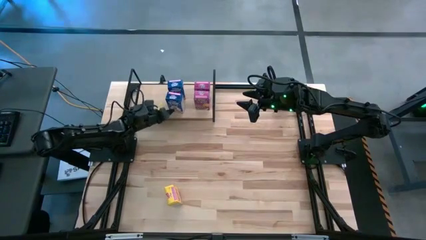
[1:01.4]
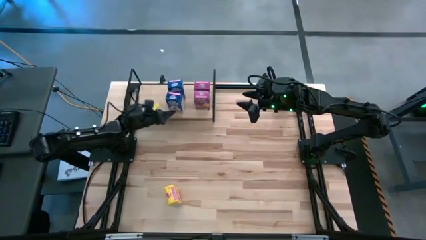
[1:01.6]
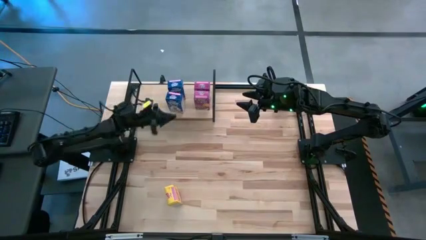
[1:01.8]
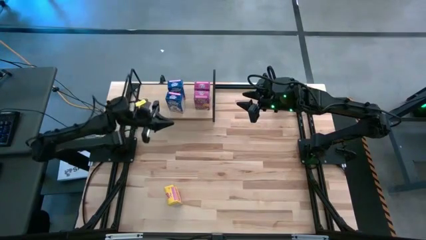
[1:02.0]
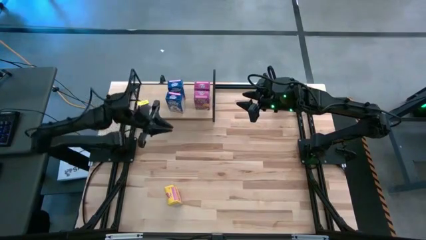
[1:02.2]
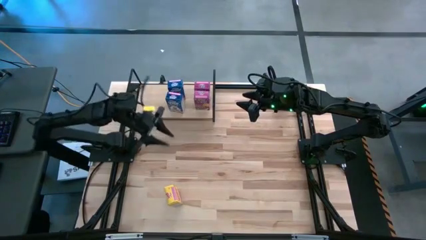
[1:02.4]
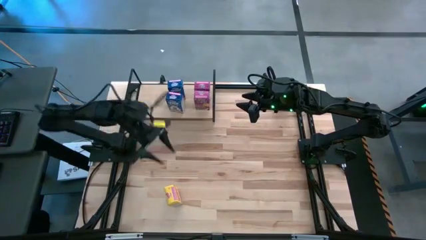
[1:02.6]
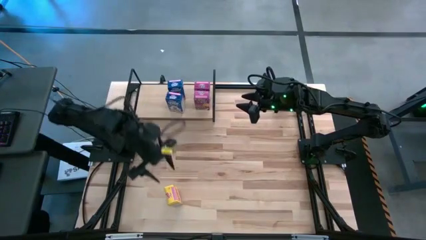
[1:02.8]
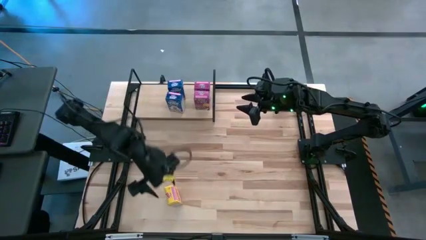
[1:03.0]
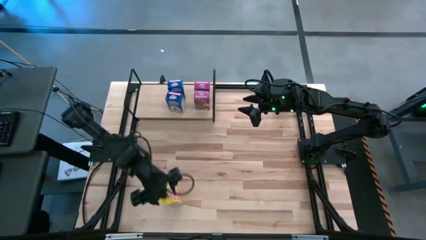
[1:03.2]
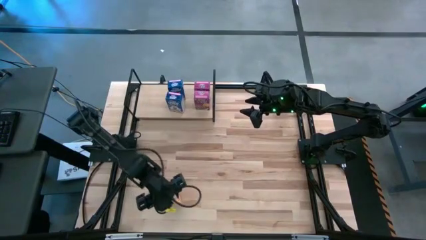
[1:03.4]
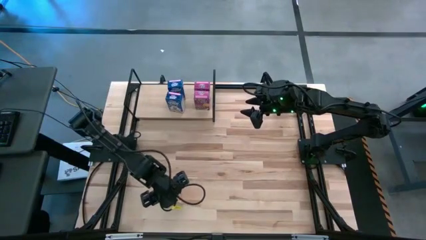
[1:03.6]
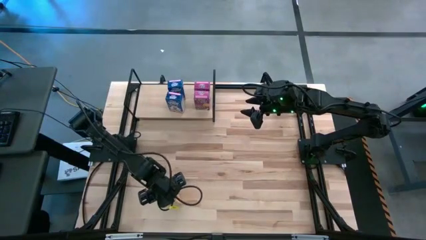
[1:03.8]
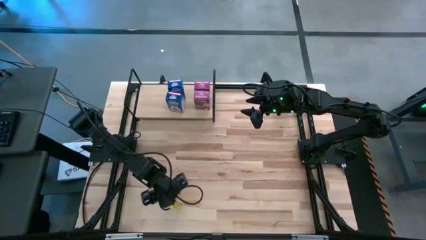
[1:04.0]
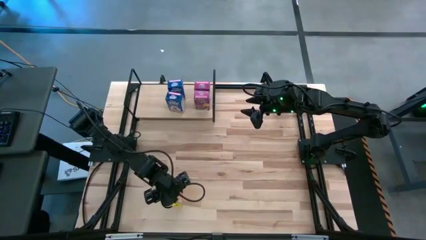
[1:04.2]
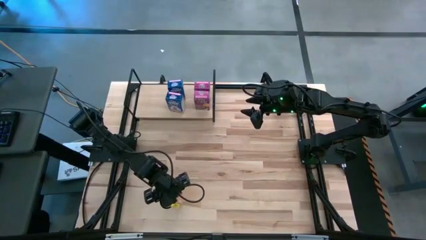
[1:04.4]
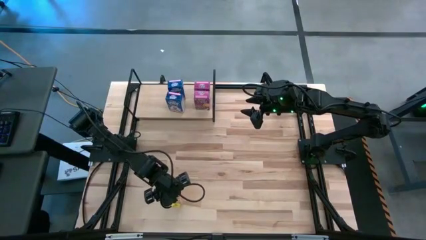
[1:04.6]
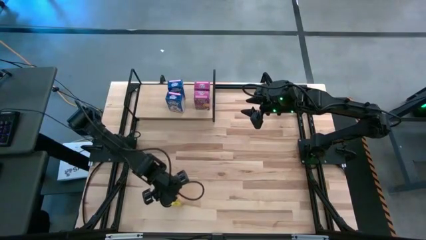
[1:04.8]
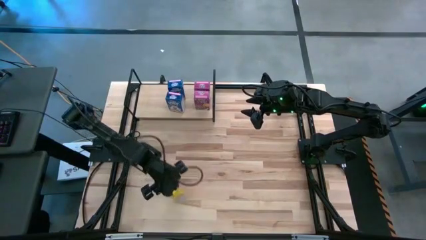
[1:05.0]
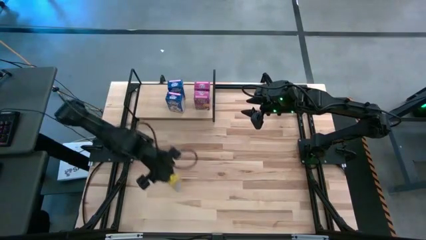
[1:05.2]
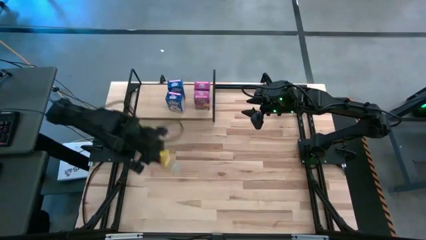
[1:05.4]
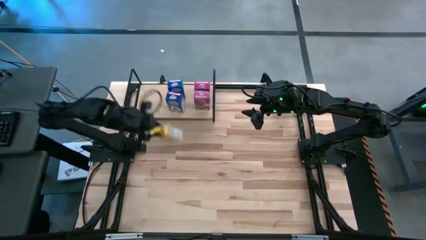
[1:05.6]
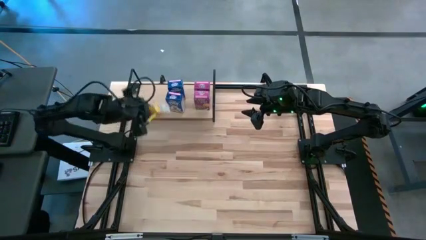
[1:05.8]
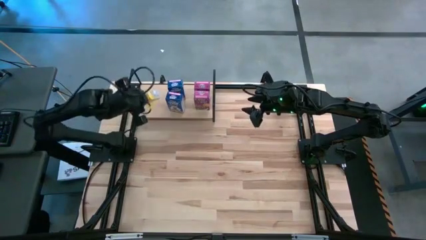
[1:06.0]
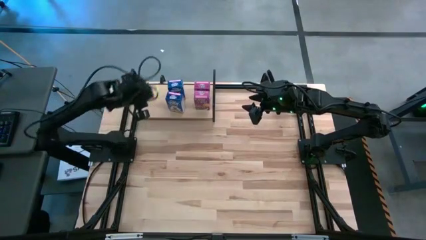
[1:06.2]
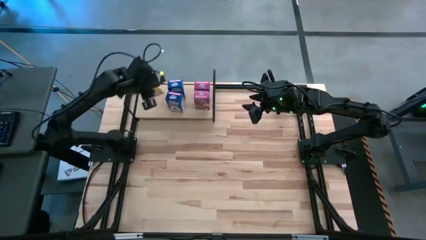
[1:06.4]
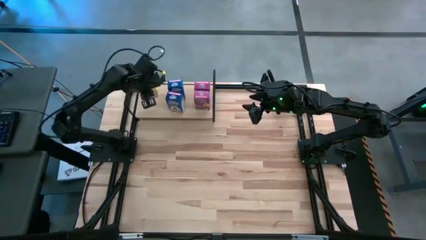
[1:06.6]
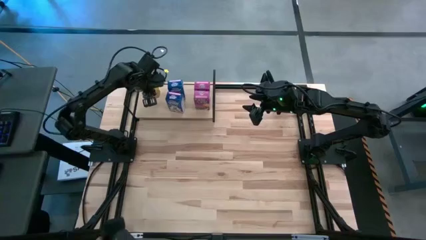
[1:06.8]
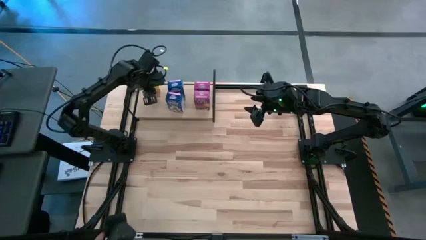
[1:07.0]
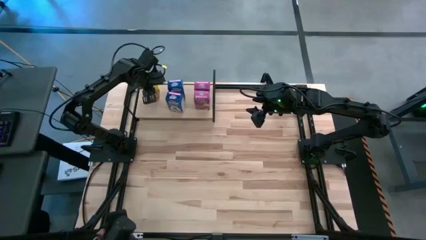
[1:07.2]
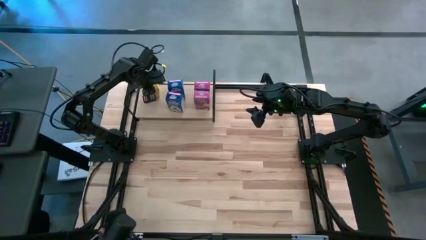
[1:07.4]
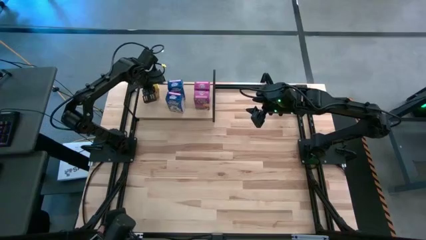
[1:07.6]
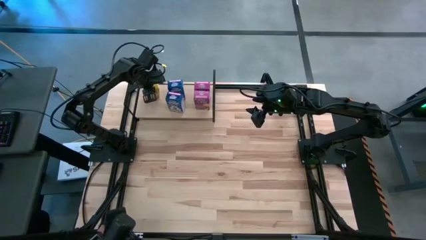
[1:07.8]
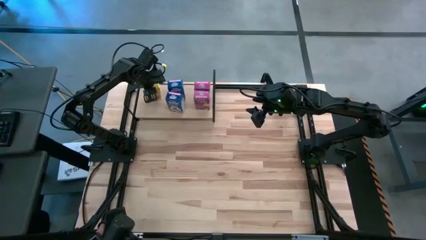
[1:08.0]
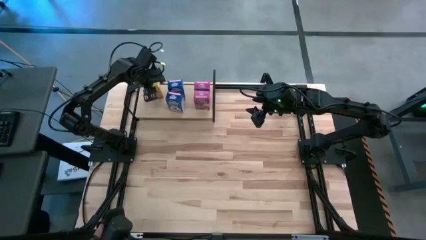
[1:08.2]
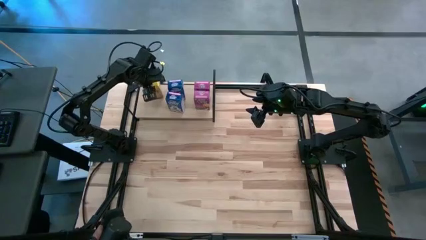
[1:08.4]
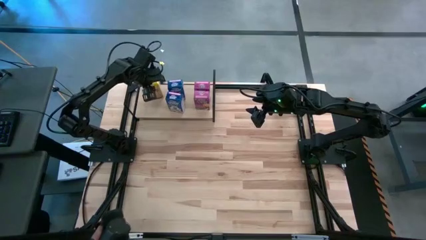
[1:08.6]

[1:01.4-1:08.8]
Task: Stack cereal on shelf
Put the bottom yellow cereal box on the shelf

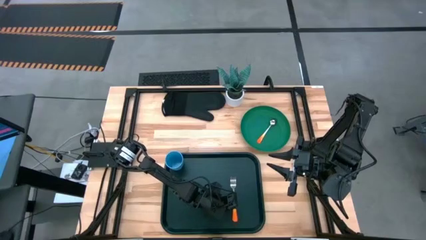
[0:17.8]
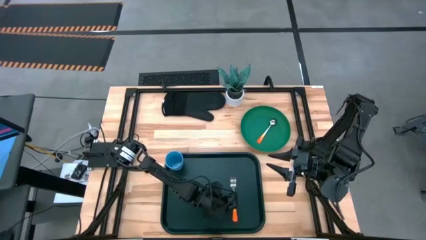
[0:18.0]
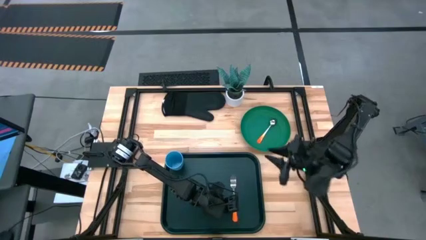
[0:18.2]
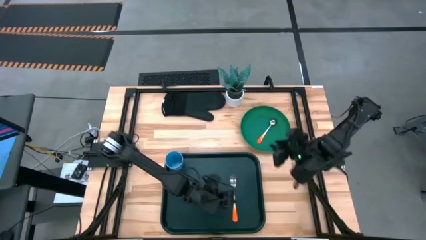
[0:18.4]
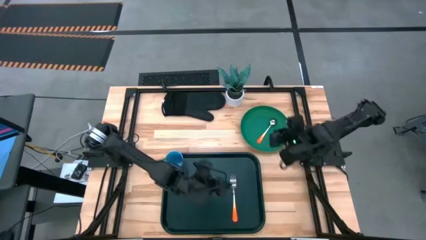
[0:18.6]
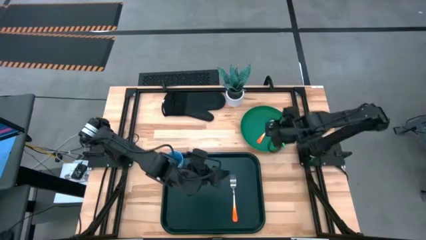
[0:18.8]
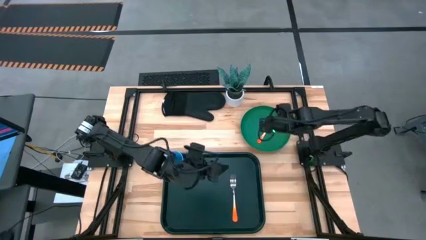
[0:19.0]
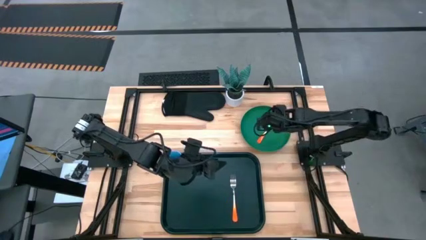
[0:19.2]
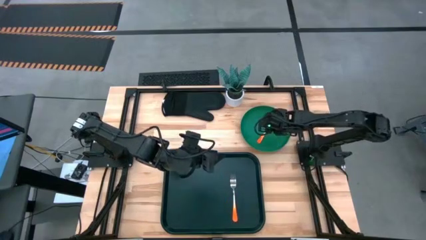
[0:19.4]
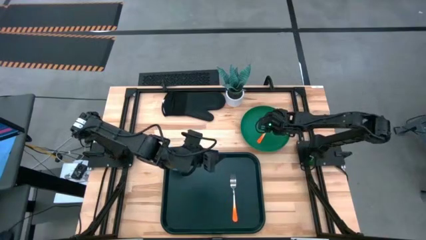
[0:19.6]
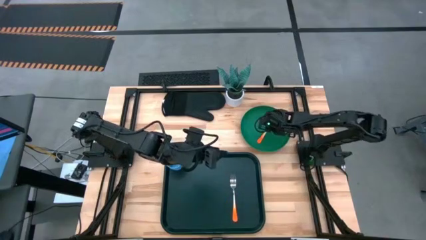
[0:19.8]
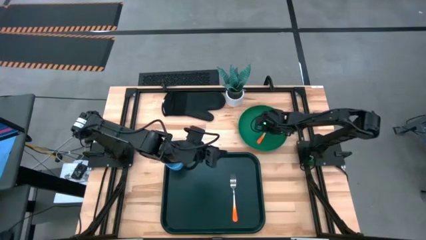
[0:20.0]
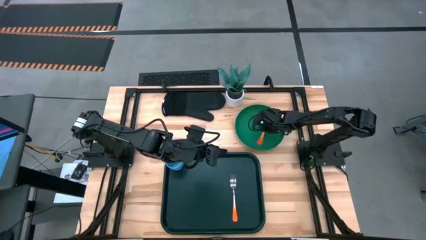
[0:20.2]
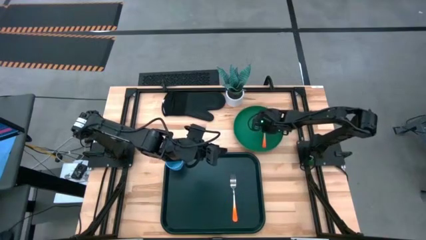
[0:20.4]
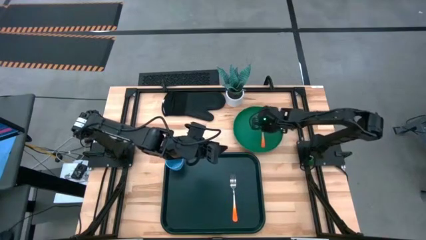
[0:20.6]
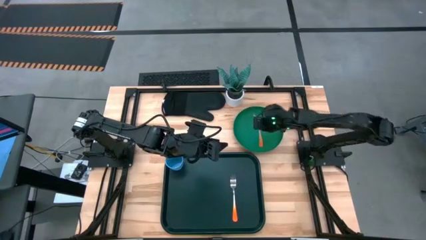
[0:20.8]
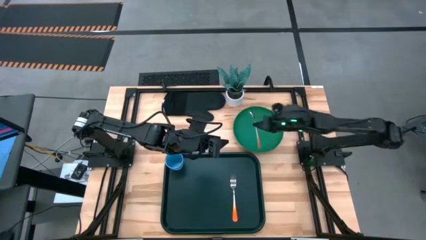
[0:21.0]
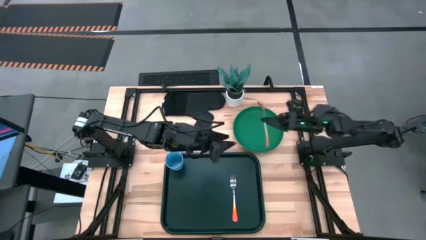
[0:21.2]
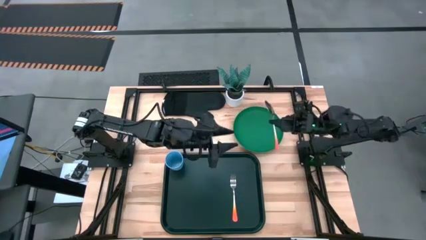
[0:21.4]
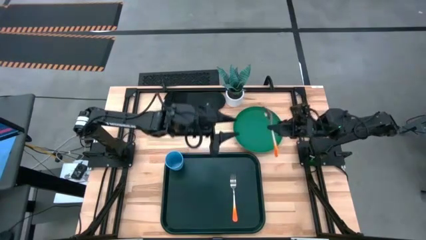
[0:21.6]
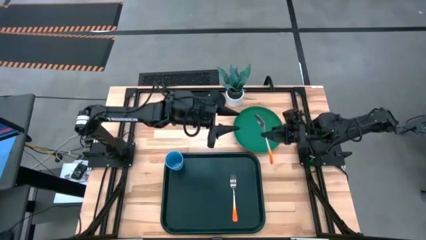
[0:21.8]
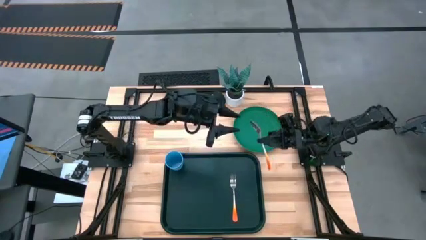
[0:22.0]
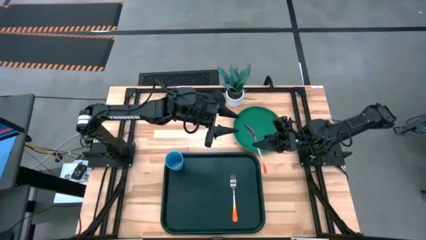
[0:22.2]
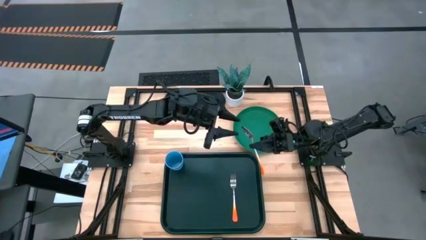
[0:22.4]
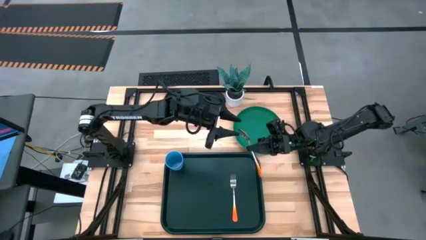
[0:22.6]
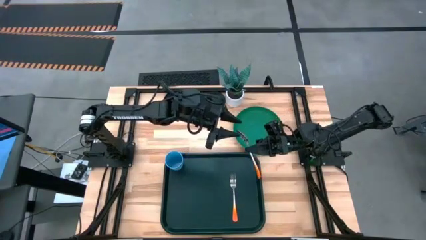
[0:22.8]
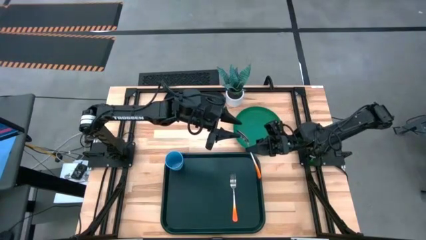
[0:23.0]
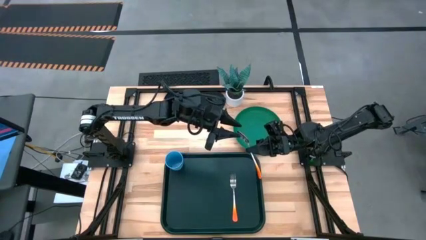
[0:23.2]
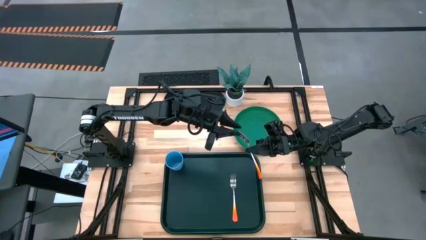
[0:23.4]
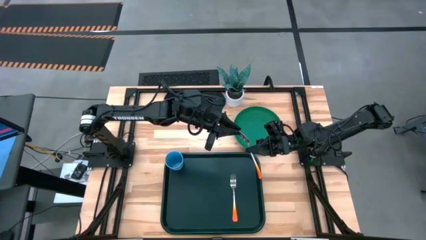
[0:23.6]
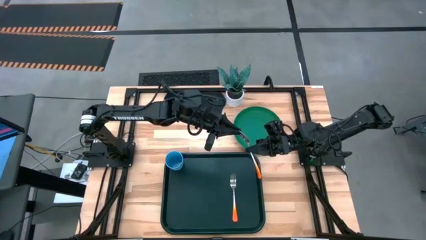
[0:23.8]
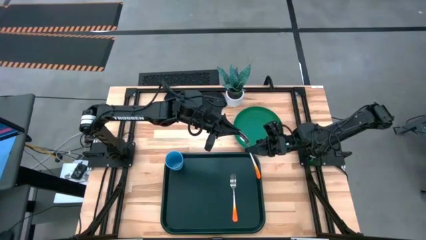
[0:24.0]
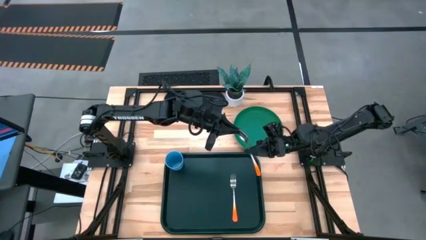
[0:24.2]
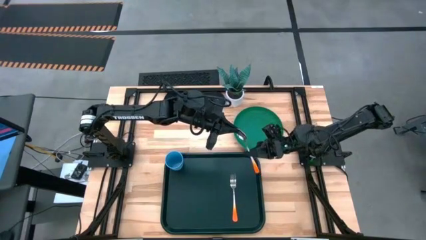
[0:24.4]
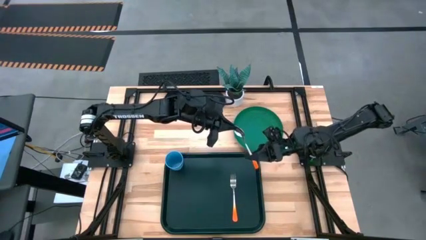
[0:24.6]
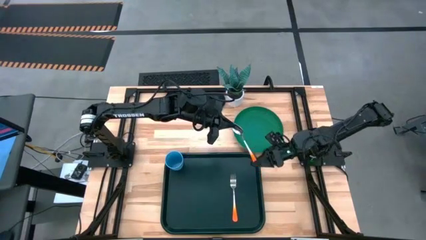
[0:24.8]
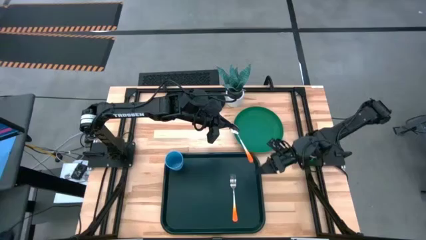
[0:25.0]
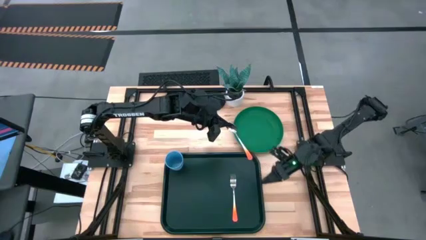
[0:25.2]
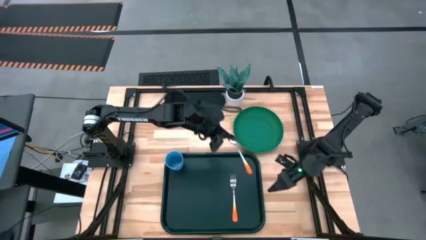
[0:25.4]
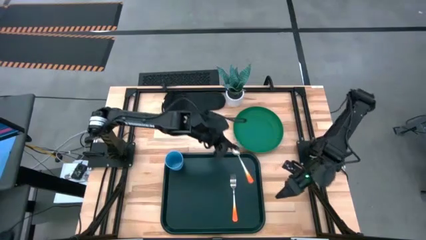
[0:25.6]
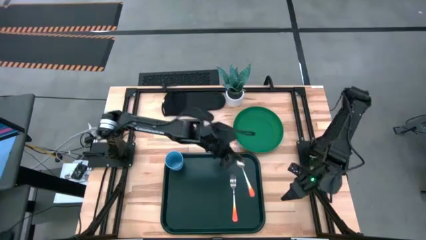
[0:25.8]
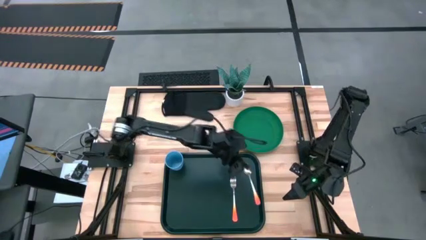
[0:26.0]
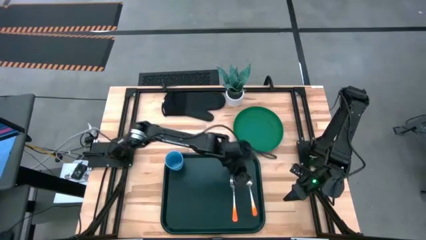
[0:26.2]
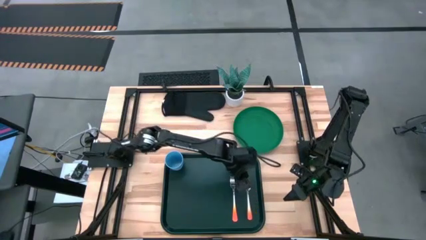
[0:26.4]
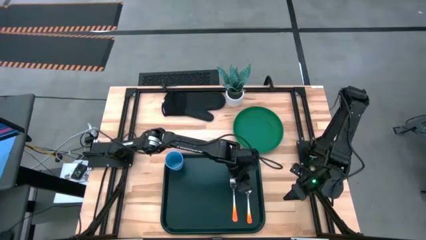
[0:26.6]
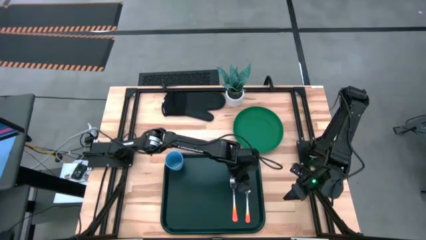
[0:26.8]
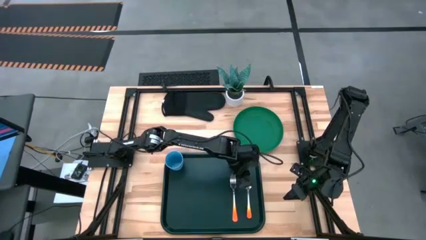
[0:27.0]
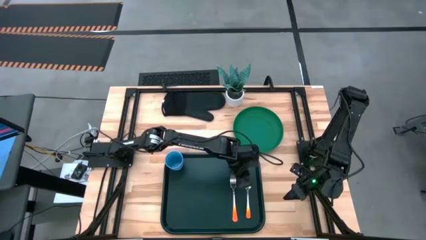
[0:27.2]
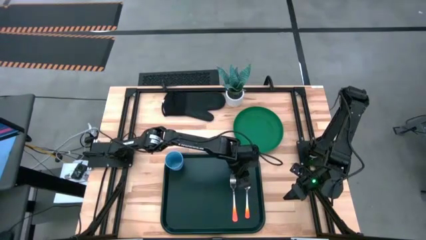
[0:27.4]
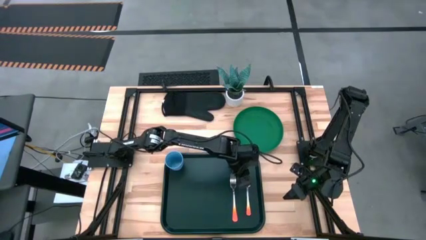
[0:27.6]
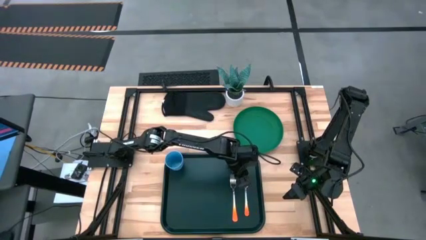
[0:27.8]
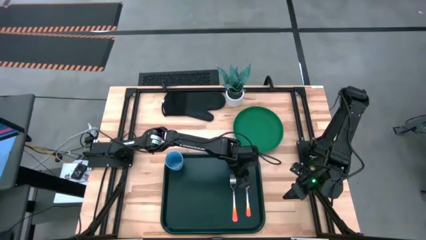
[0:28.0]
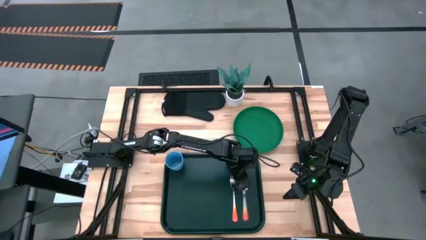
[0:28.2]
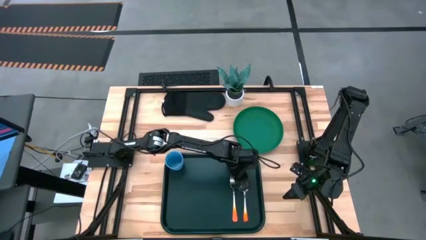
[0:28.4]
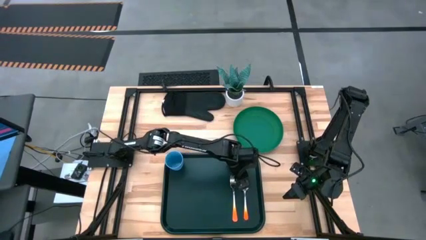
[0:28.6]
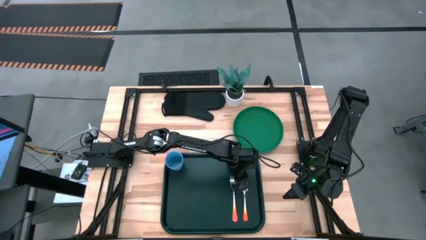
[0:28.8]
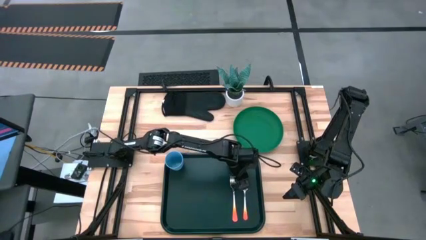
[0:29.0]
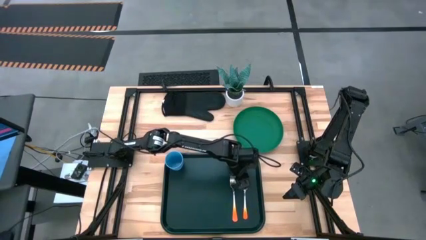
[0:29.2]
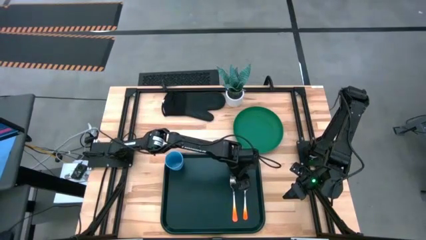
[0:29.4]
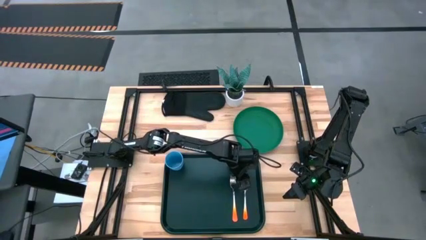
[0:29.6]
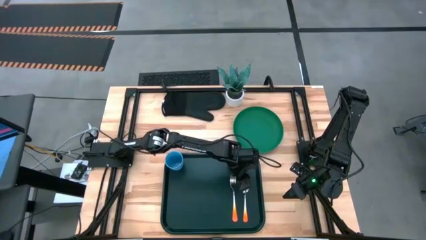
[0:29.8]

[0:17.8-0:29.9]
Task: Pick and place plate/cup/fork/spoon on tray
Put the orange spoon on the right of the orange fork on the serving tray
